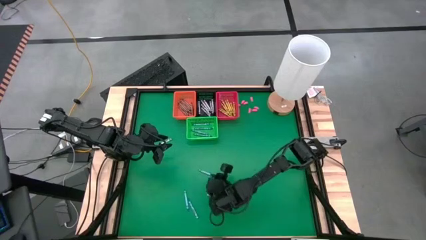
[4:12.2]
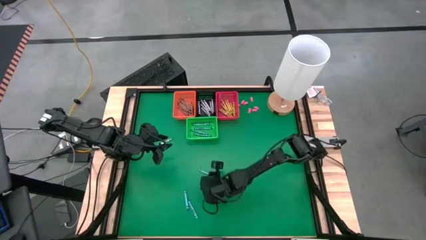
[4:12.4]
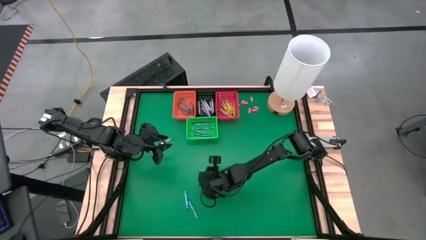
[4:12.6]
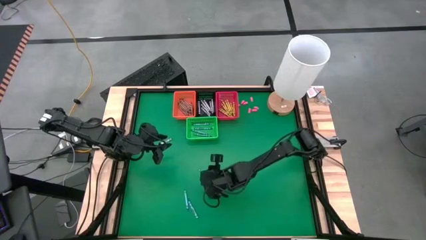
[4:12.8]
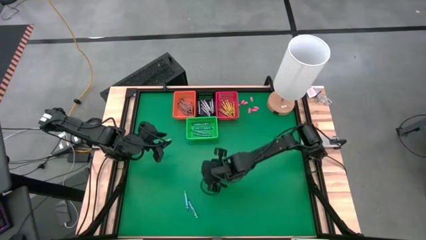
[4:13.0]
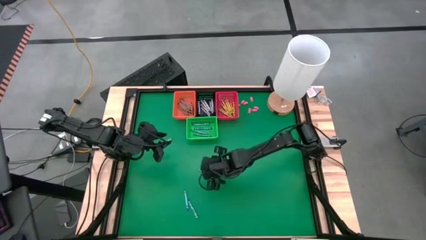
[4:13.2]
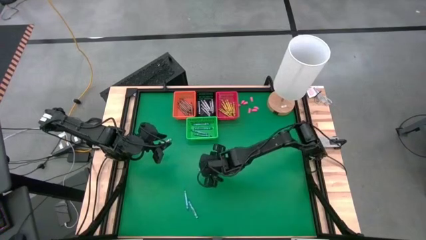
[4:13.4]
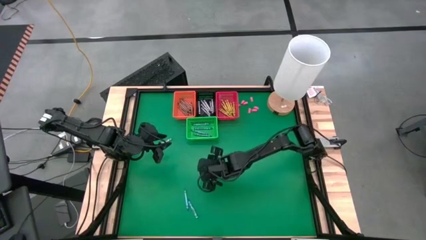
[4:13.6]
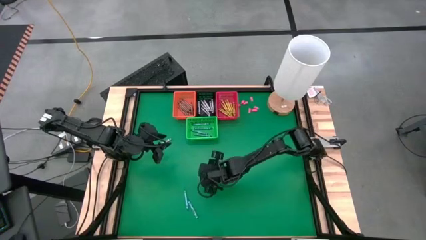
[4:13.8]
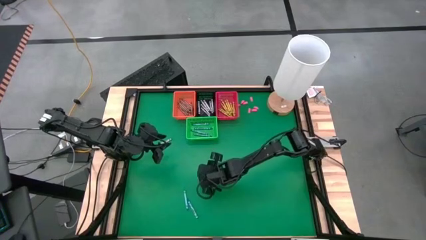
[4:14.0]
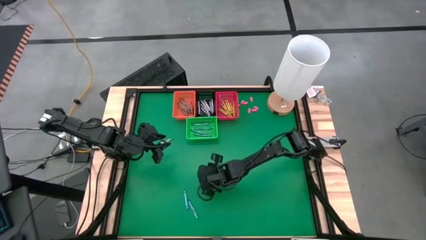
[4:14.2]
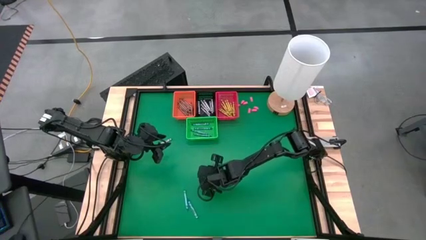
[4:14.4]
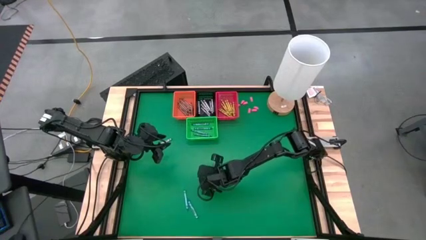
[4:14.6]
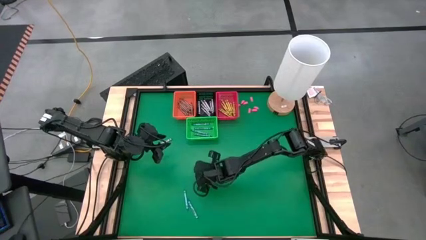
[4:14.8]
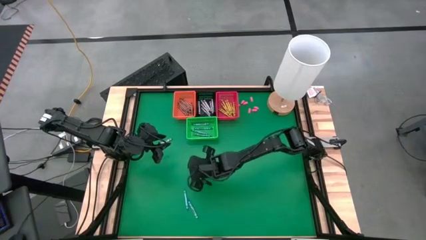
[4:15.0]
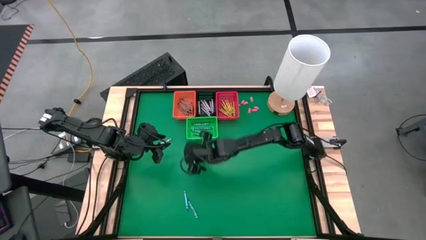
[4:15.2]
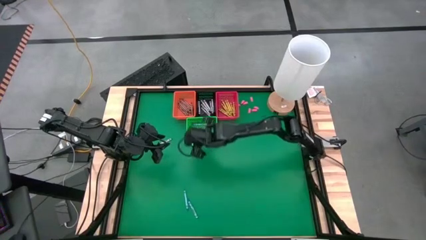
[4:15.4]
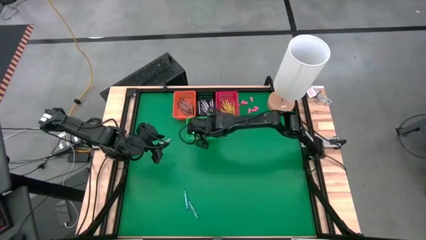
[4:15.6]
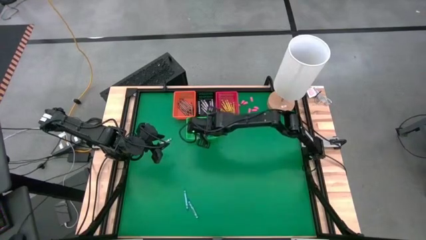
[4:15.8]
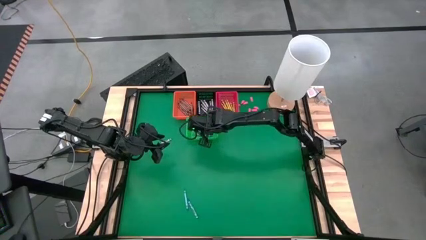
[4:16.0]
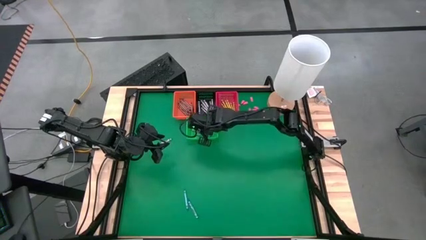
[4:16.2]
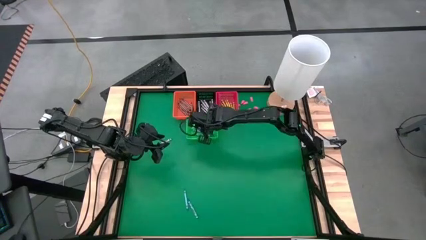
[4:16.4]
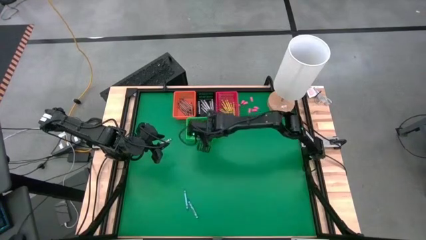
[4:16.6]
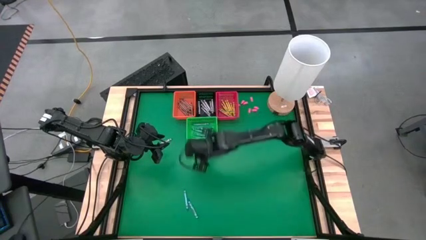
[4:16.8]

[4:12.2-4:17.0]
Task: Sort crayons
Put a blue crayon in the green basket

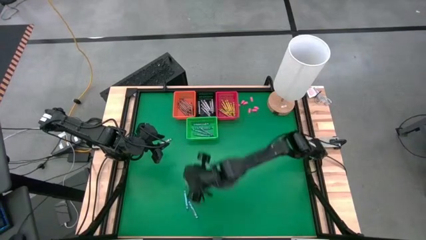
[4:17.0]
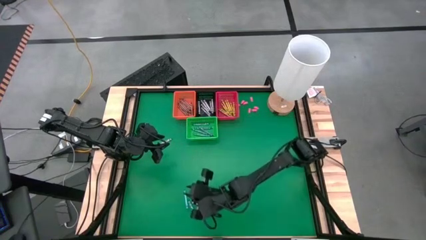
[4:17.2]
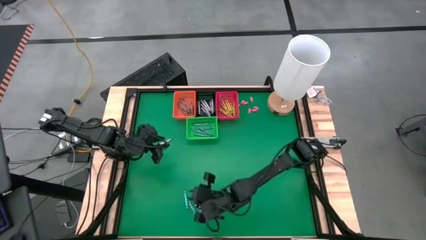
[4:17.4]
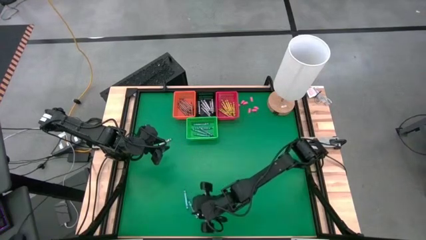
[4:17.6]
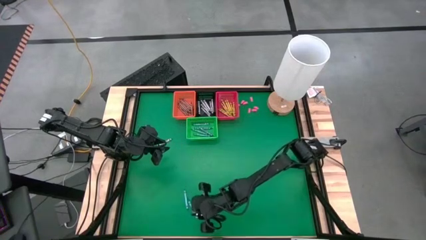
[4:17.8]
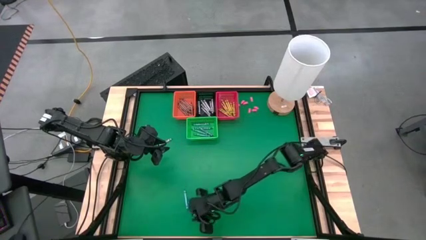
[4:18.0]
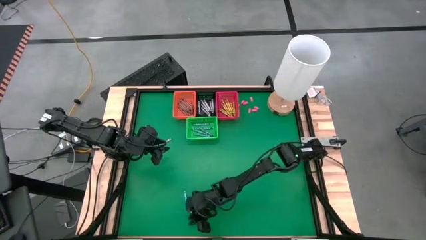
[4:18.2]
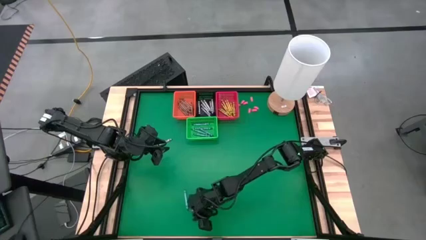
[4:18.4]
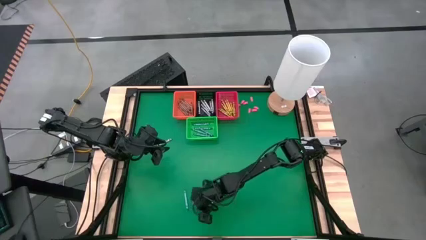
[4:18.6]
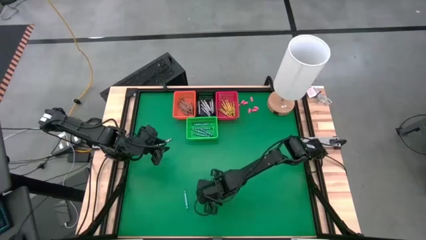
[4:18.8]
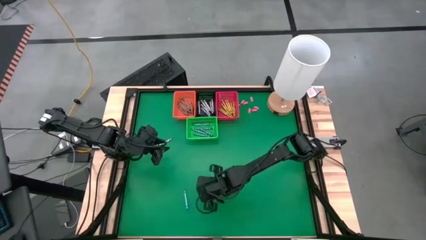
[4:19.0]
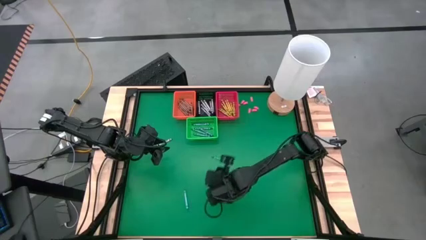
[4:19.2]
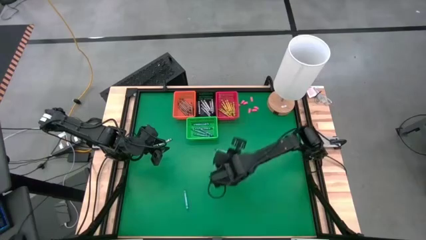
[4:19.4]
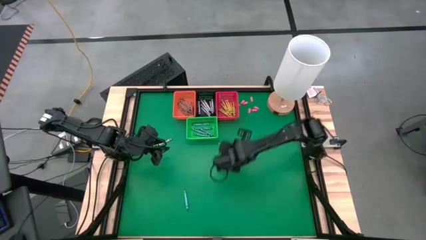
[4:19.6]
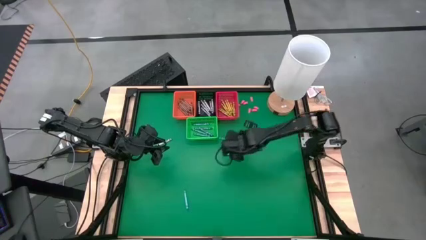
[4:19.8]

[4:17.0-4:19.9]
Wrap was successfully made it

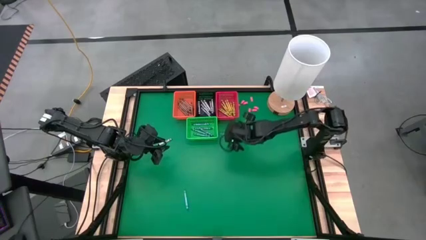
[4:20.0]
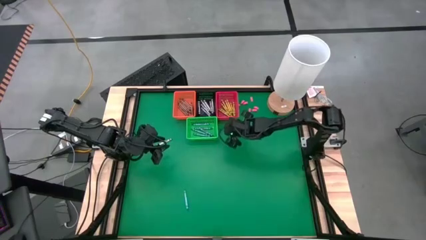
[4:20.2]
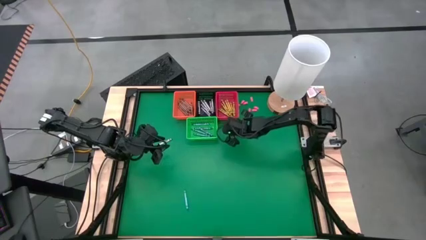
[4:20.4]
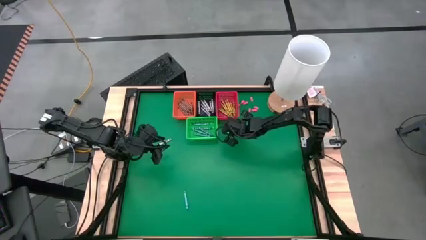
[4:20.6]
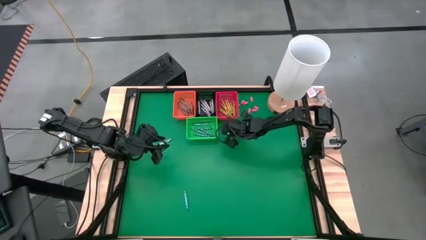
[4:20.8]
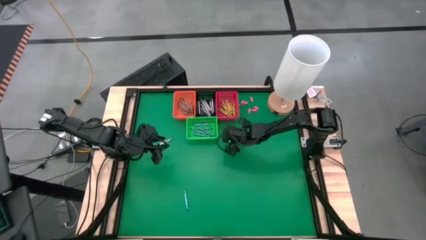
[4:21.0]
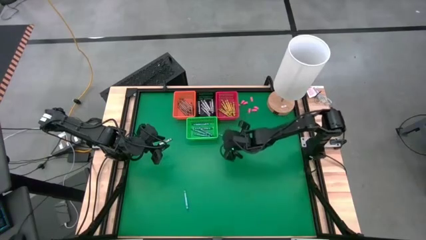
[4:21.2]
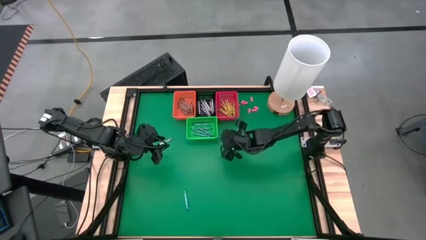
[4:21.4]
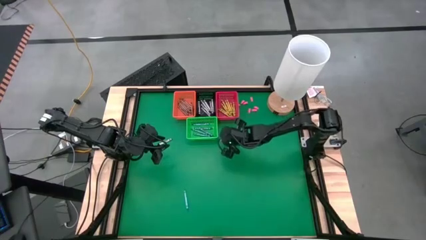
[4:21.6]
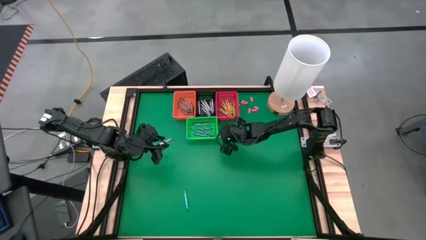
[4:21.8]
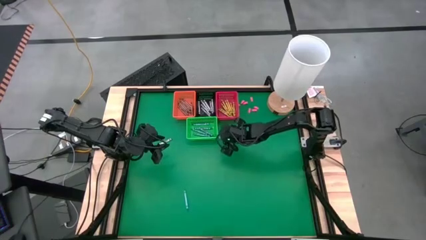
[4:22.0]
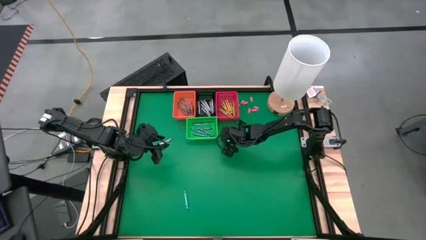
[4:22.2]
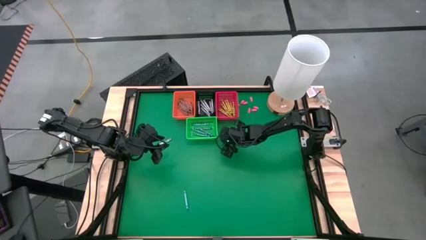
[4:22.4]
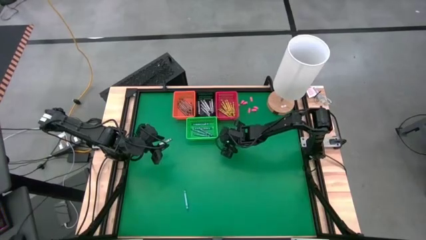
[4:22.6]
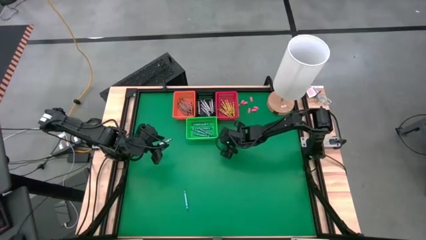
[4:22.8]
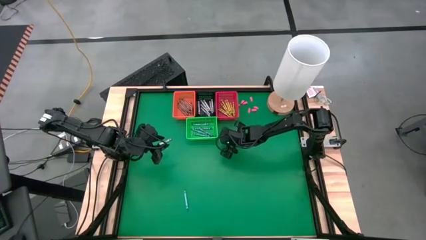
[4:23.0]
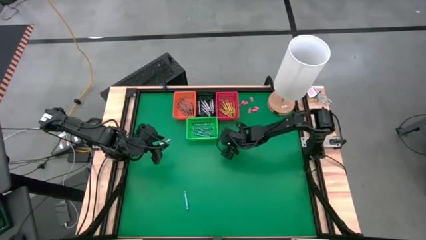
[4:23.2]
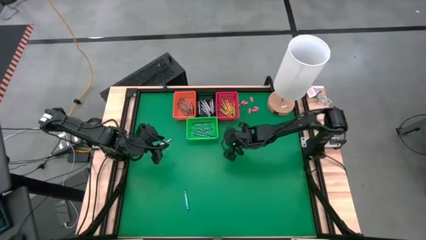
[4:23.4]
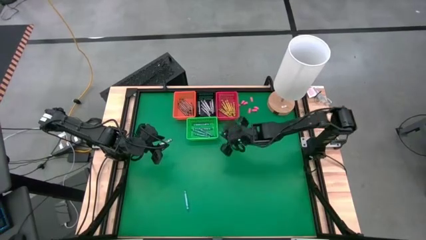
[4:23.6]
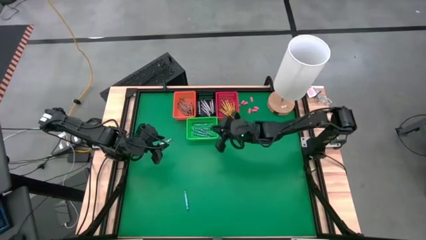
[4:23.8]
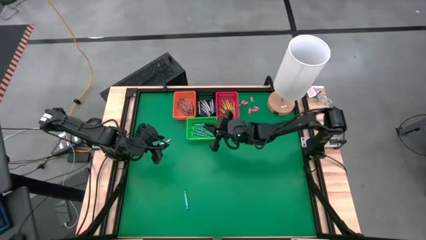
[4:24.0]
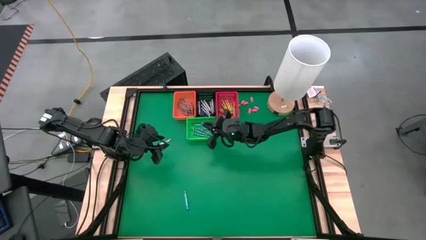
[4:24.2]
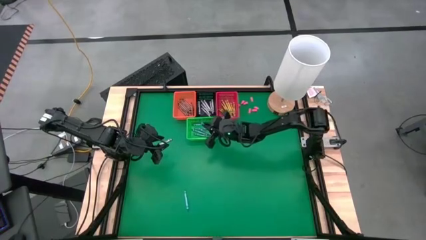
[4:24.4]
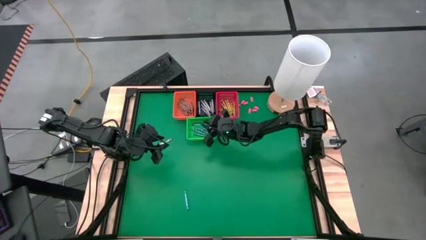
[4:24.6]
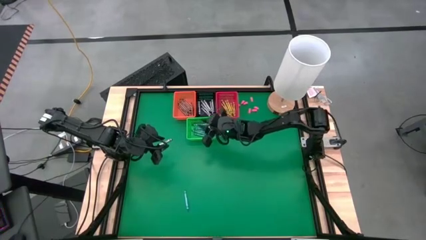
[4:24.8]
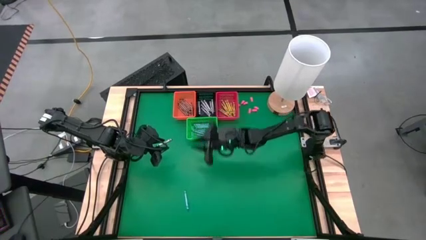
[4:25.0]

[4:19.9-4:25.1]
Put a blue crayon in the green basket
